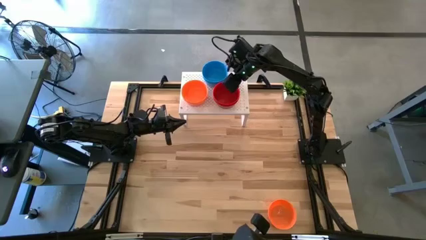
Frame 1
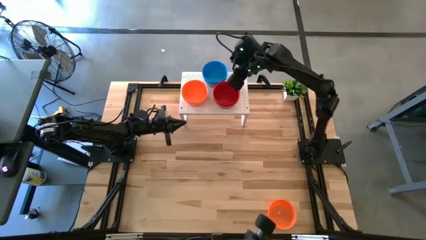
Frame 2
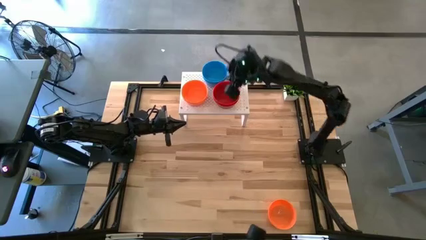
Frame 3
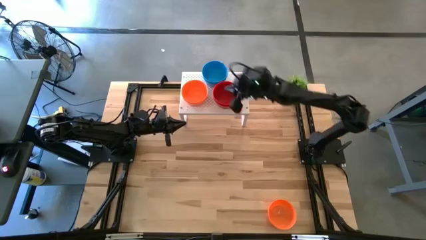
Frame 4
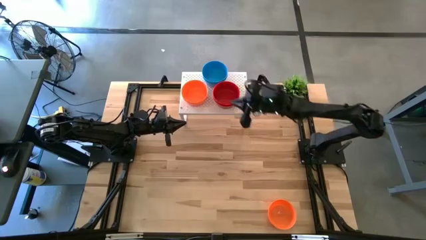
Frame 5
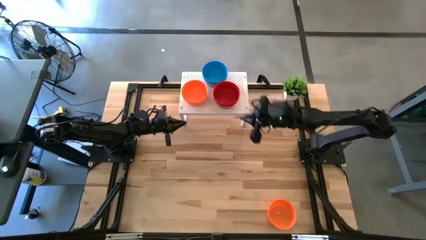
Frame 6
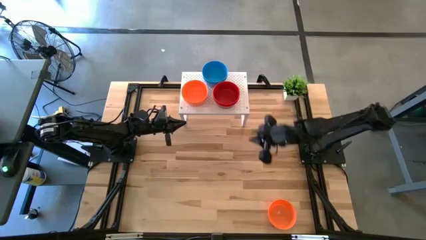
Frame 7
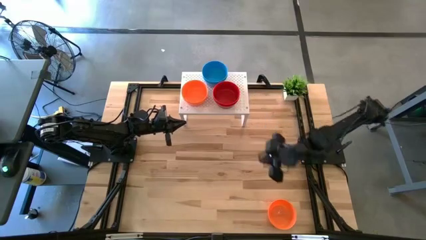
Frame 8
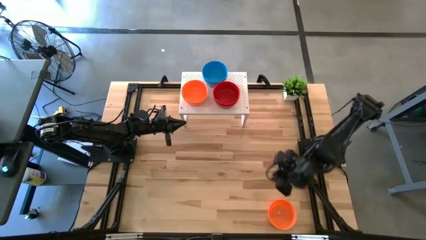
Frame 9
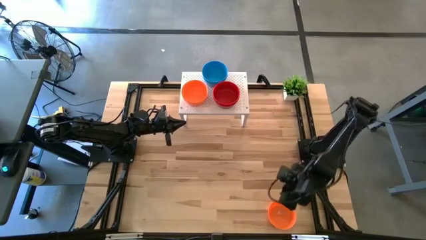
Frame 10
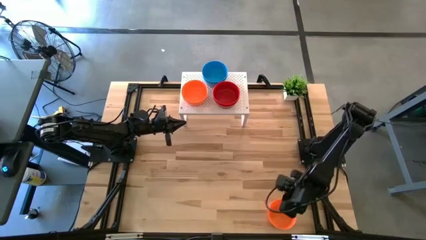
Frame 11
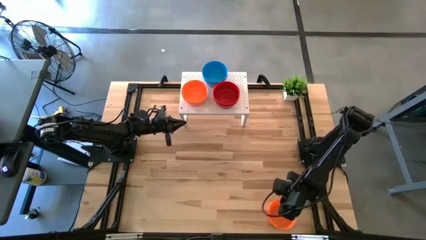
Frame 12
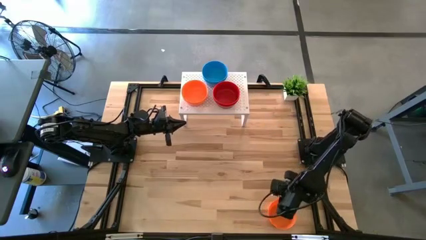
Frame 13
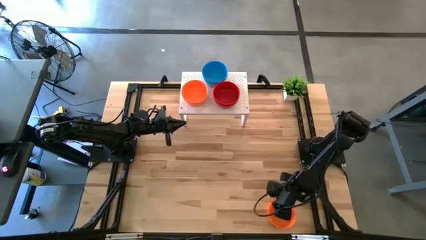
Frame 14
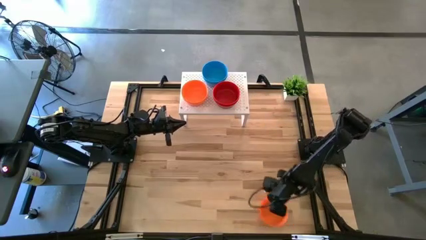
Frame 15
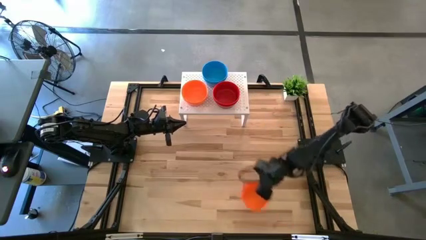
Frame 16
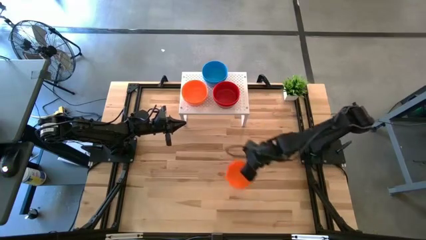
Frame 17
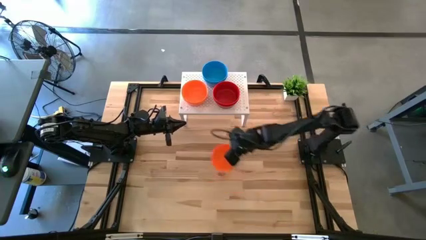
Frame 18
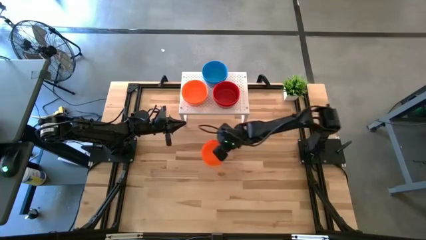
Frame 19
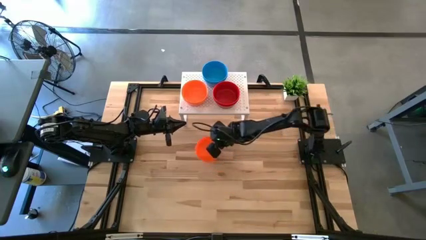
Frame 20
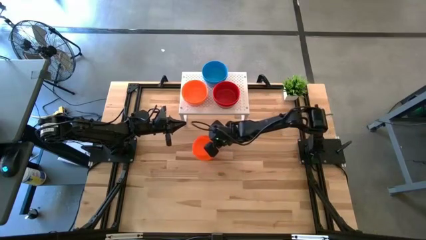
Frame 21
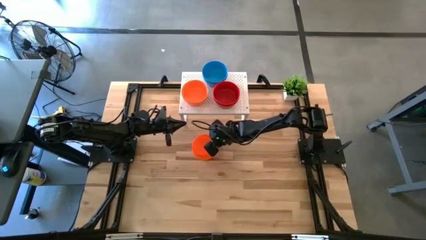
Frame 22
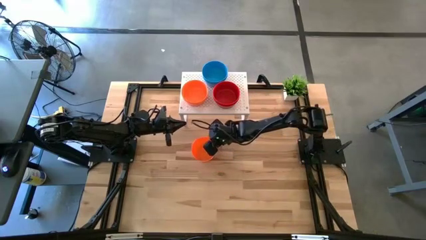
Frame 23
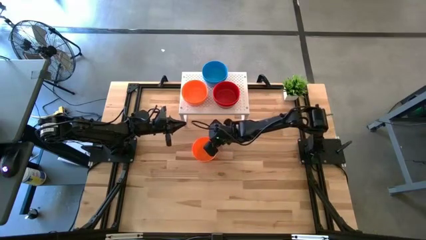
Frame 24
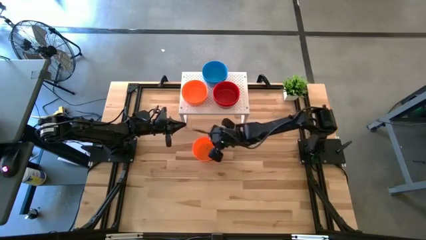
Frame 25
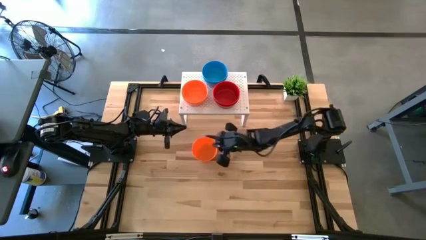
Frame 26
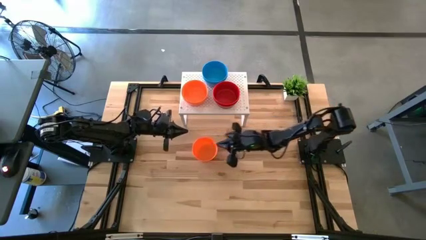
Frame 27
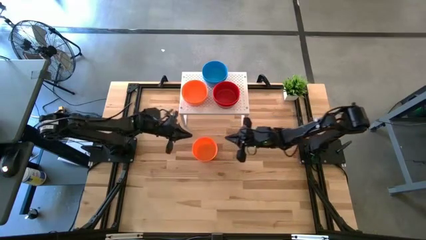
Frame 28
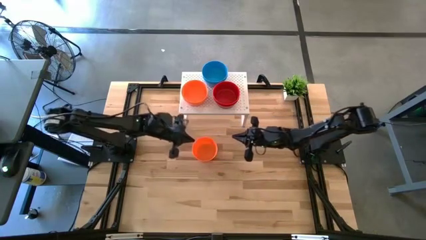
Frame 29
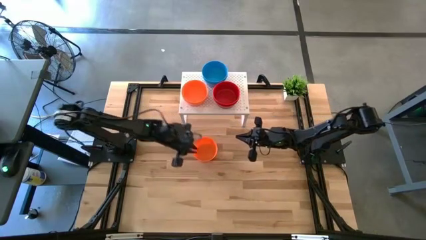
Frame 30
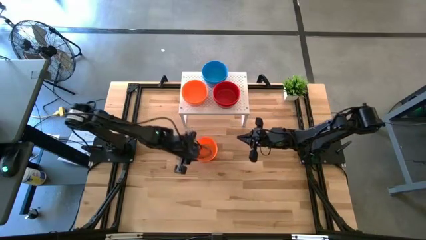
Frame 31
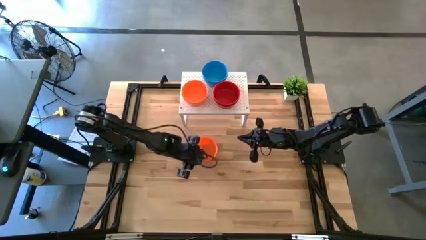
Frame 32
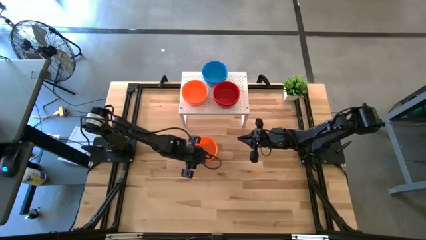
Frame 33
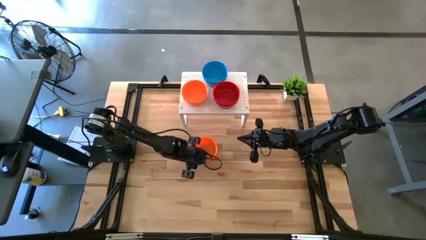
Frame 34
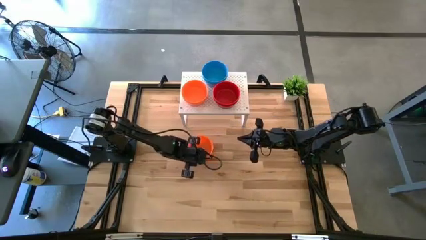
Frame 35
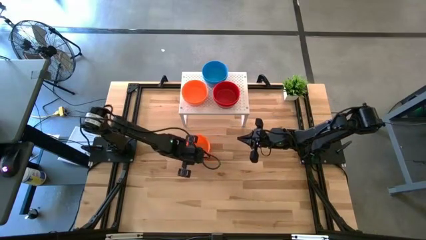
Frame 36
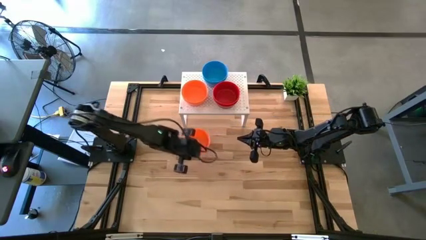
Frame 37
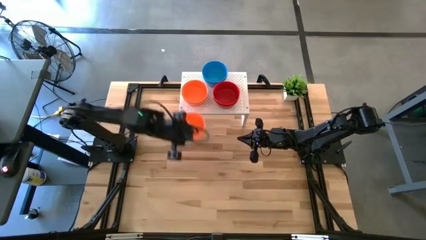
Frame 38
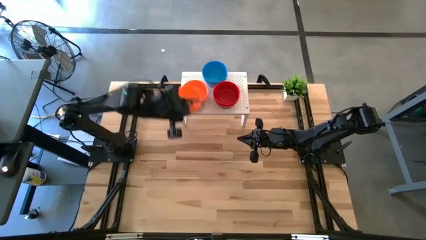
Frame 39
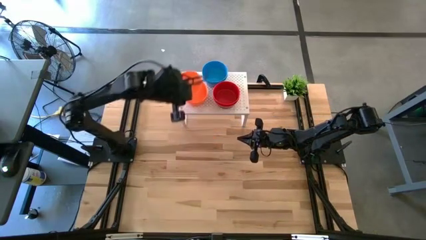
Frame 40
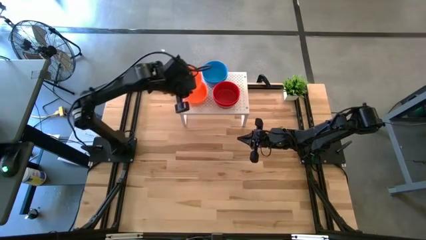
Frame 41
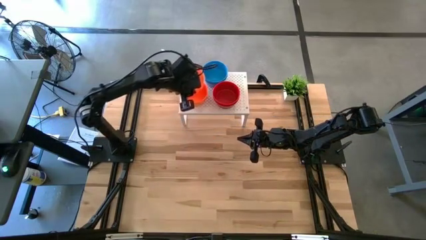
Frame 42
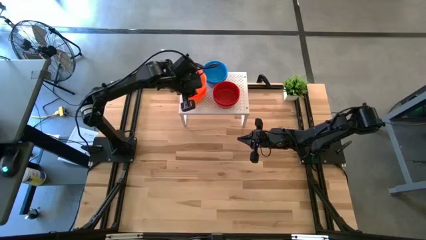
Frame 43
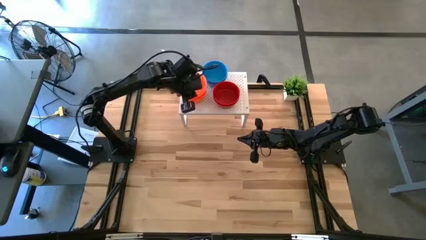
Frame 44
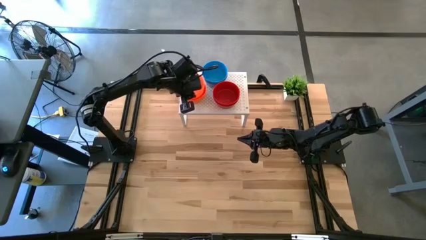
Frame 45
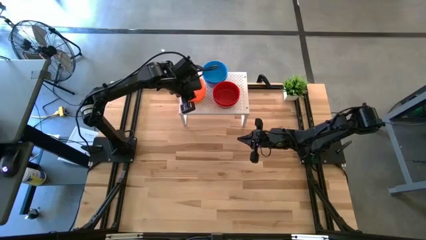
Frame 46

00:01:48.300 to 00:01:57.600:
Task: Pick & Place Mini bowls
Stack the orange bowl on the orange bowl on the shelf

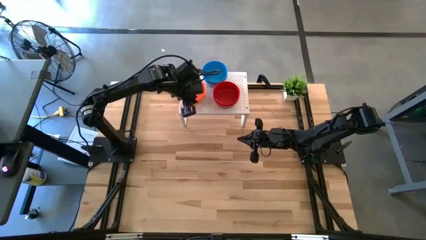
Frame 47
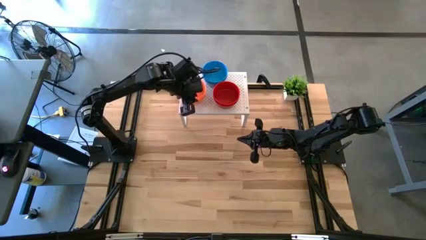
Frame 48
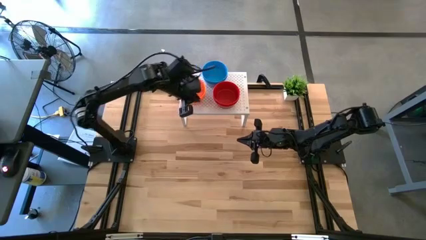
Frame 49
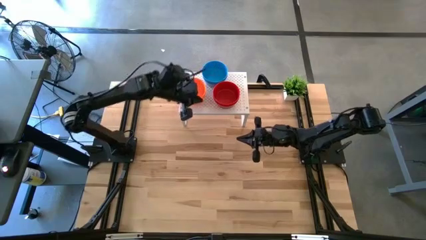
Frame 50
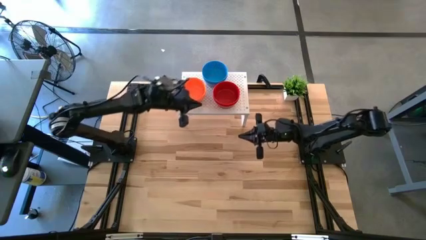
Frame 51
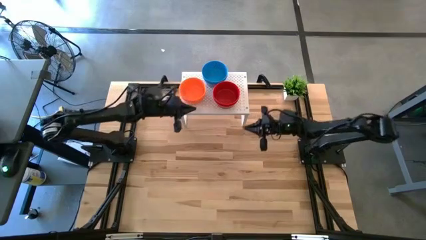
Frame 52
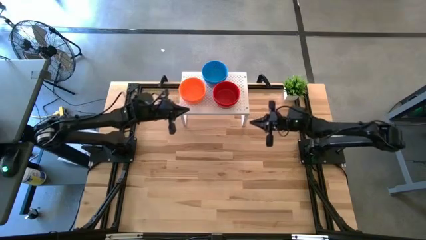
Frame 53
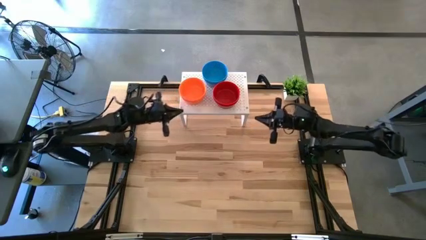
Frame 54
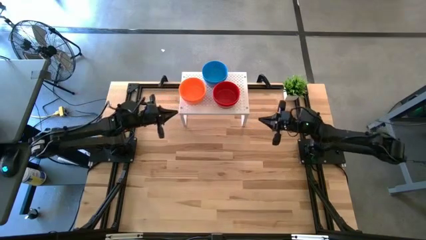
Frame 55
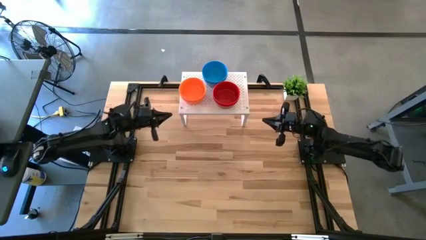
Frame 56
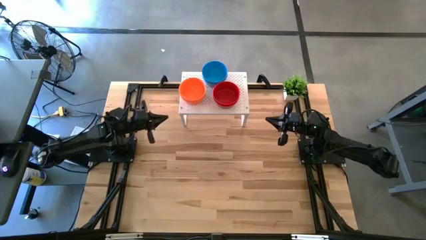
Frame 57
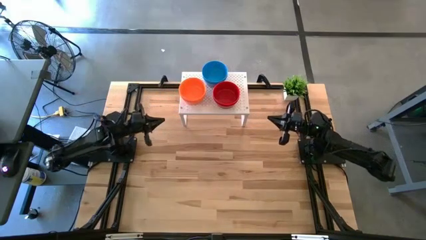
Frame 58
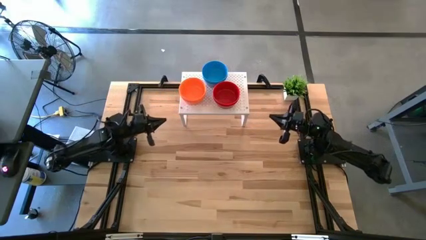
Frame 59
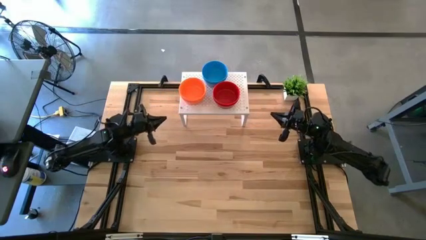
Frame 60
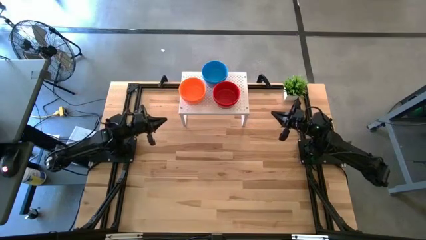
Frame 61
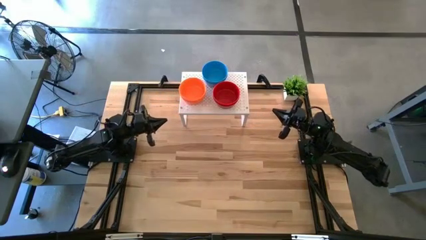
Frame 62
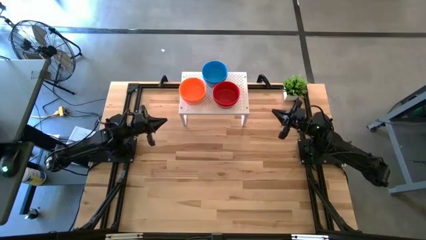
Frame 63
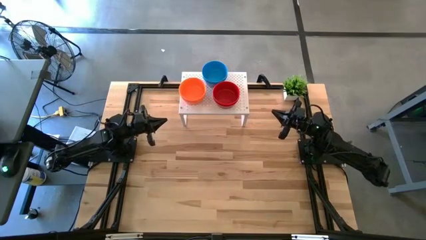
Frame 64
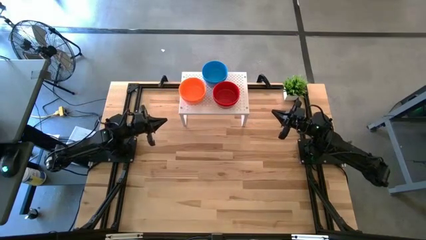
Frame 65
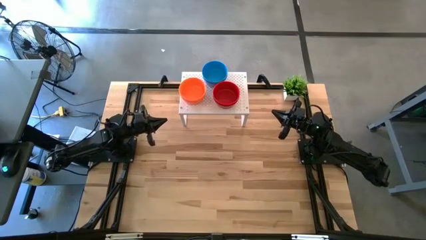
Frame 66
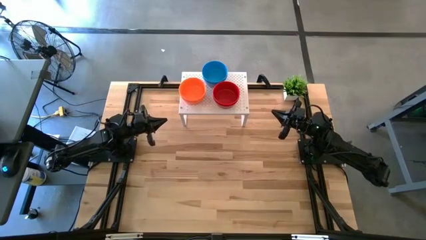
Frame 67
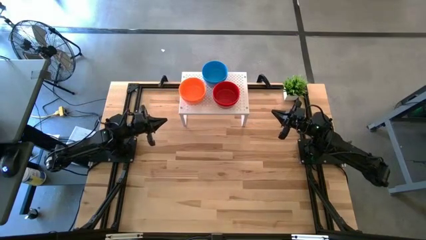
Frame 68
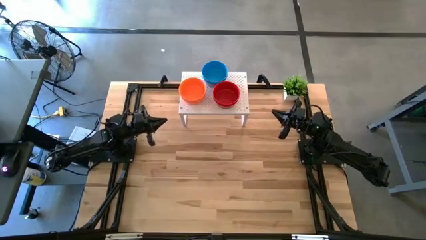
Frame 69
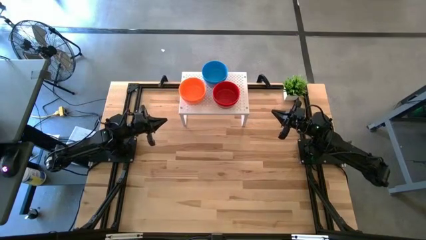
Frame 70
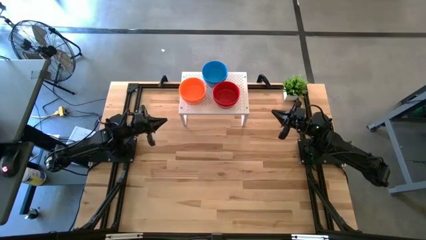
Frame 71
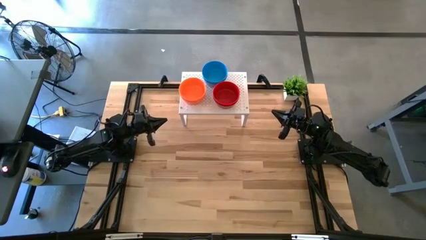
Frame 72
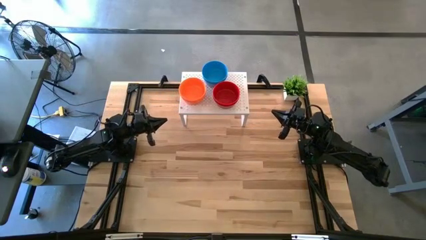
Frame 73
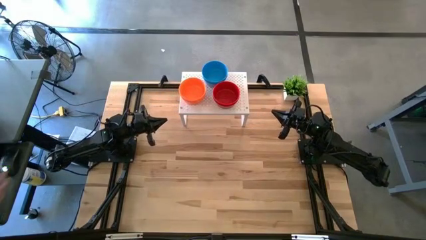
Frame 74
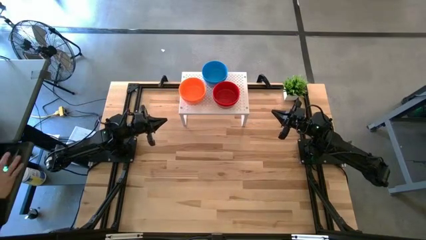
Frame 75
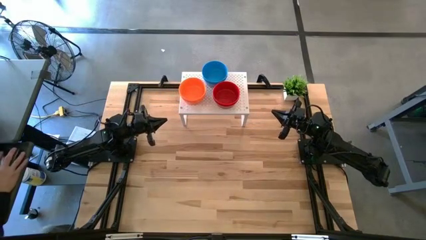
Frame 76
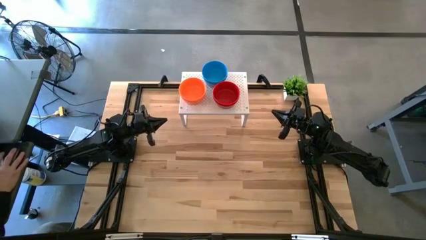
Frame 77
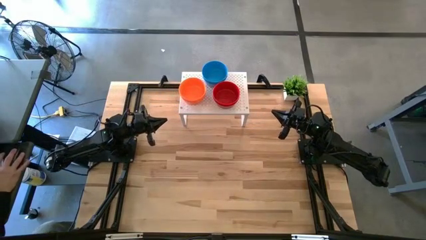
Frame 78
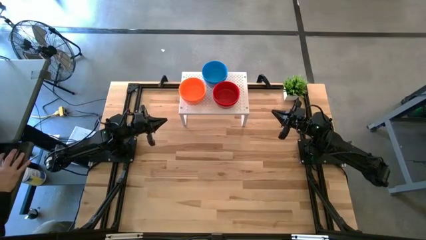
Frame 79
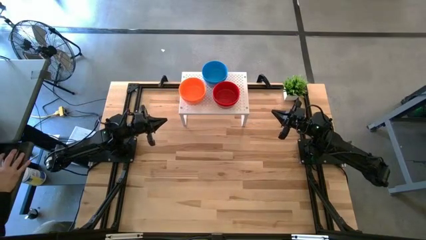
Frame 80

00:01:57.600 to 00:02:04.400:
Return to Home Position

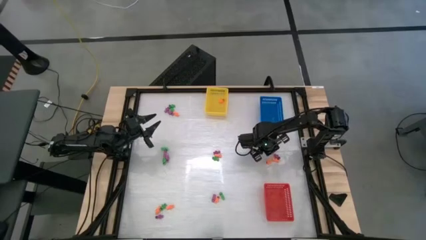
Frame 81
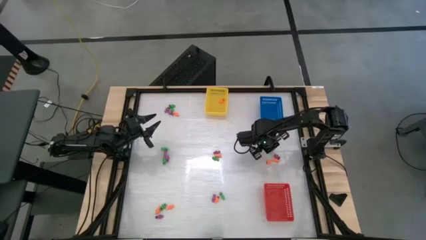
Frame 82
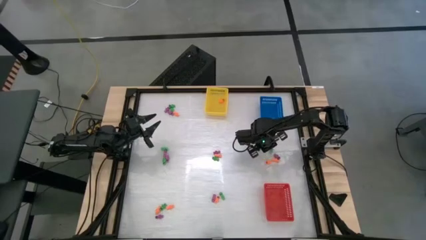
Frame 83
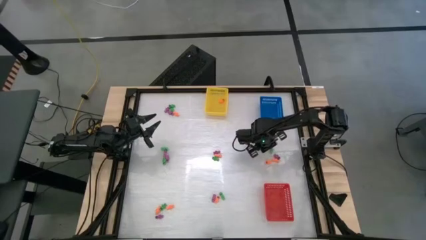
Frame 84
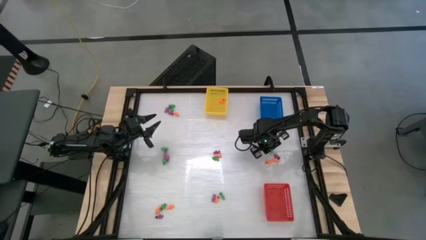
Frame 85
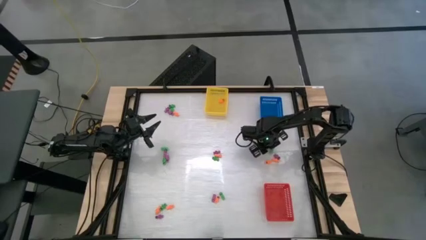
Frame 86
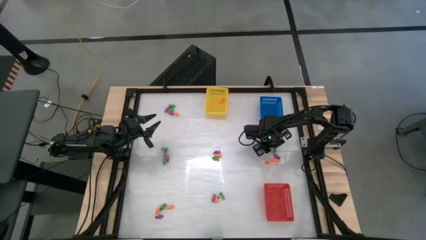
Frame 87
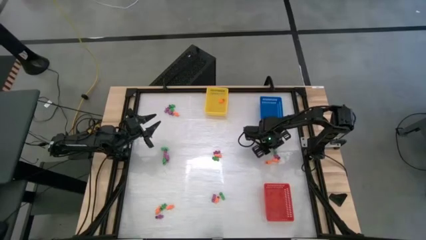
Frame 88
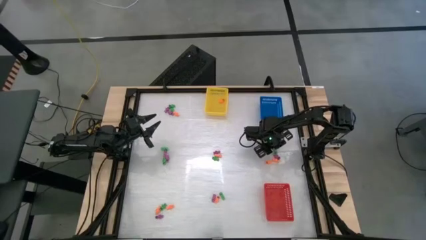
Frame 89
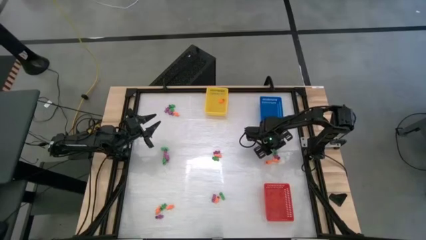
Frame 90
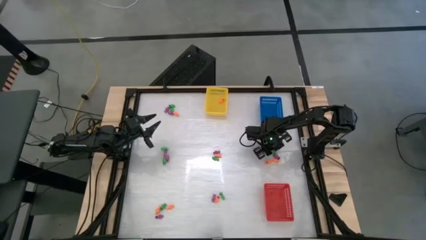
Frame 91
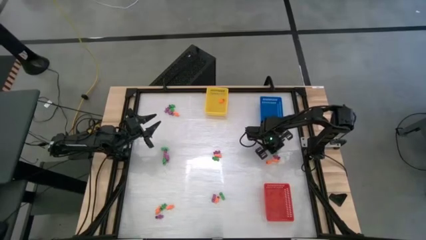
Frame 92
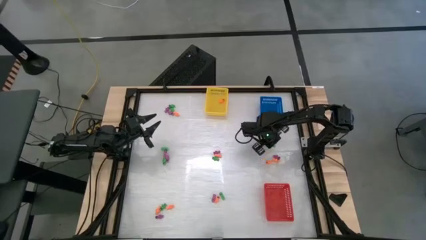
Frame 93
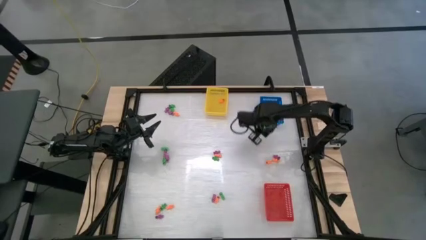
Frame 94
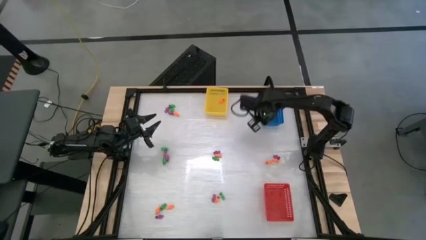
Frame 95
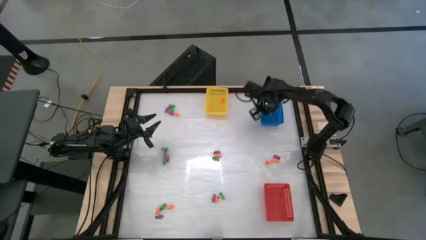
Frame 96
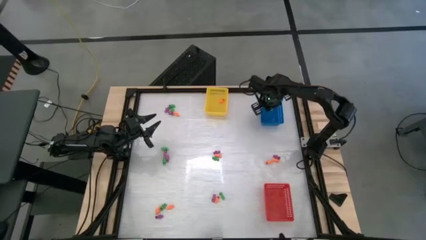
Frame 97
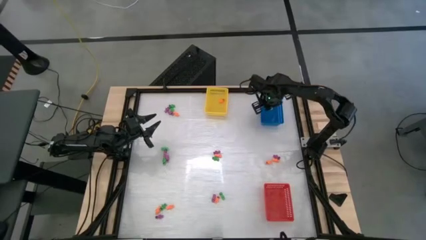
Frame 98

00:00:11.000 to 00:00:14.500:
Task: Sort Halloween decoration
Put the green skeleton toy into the blue bin
